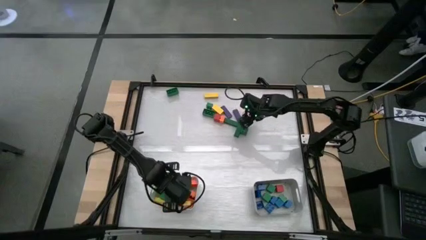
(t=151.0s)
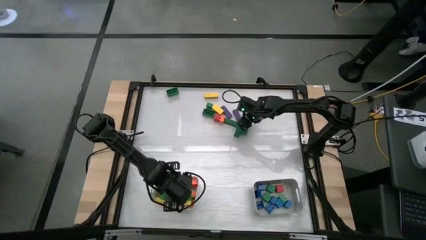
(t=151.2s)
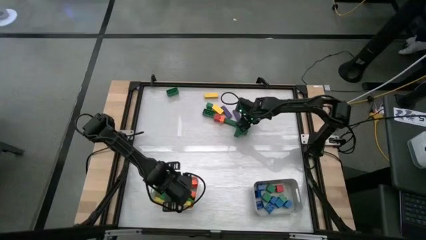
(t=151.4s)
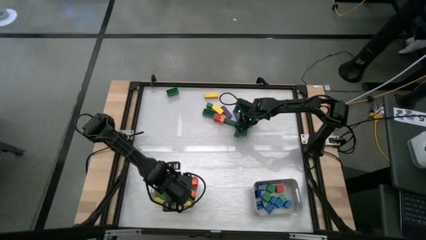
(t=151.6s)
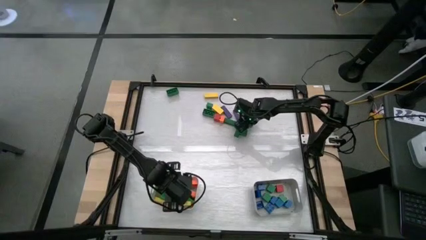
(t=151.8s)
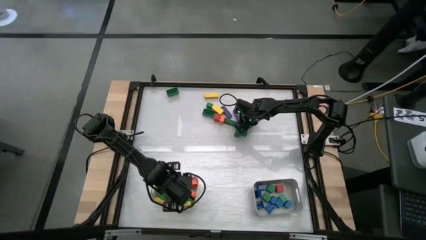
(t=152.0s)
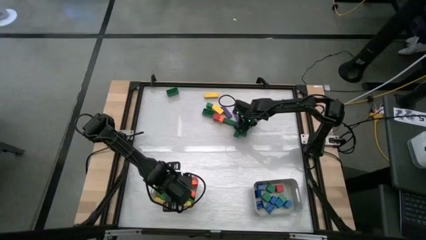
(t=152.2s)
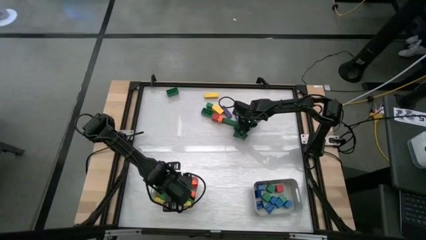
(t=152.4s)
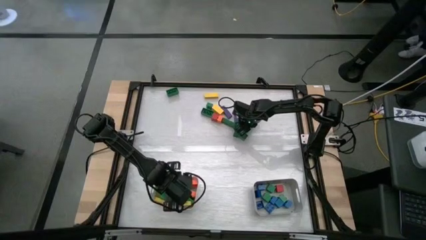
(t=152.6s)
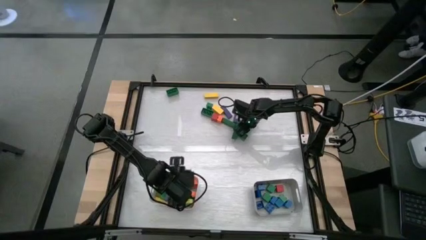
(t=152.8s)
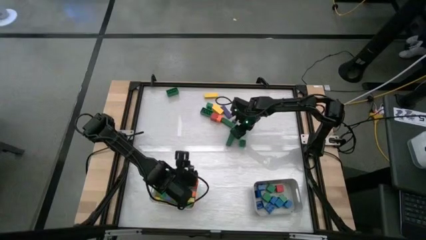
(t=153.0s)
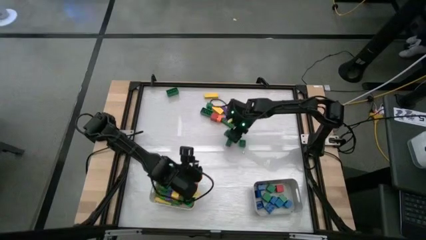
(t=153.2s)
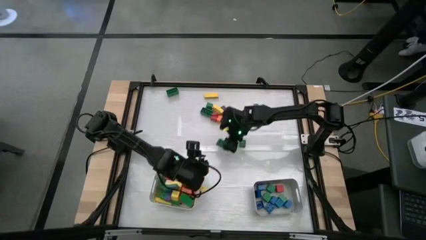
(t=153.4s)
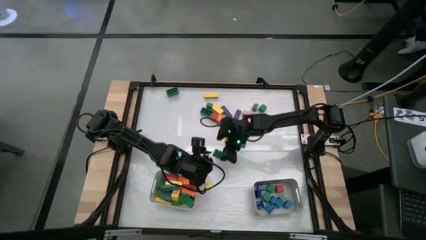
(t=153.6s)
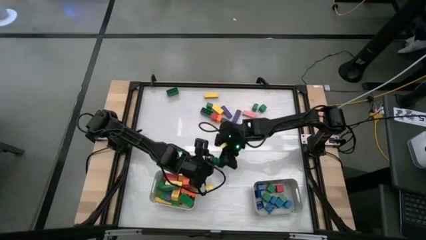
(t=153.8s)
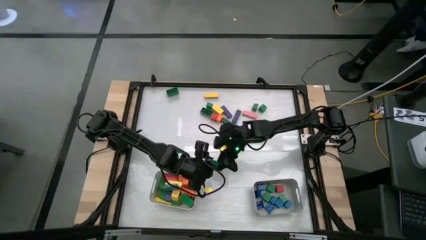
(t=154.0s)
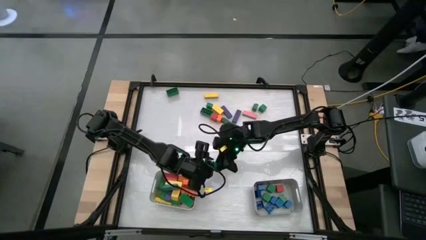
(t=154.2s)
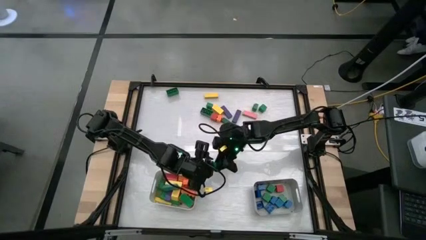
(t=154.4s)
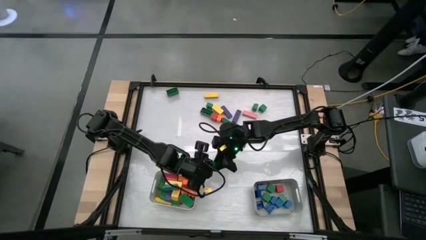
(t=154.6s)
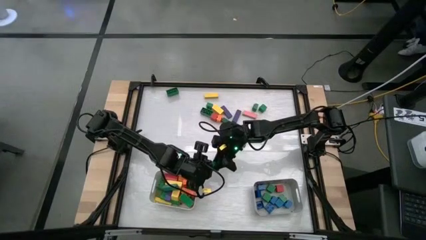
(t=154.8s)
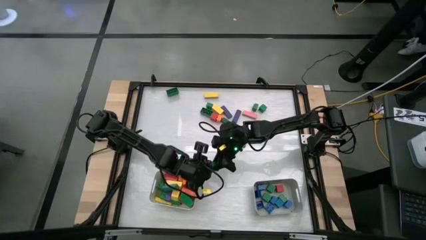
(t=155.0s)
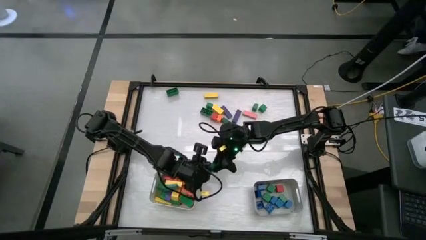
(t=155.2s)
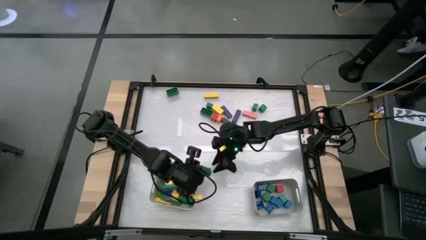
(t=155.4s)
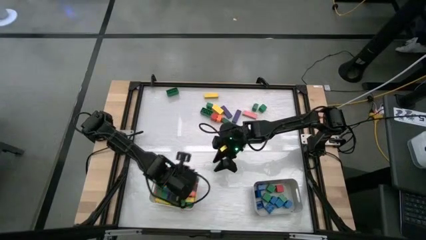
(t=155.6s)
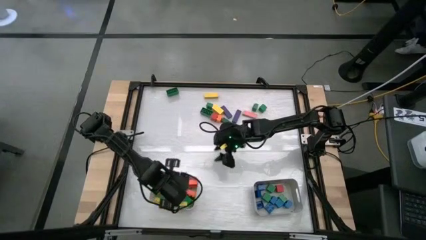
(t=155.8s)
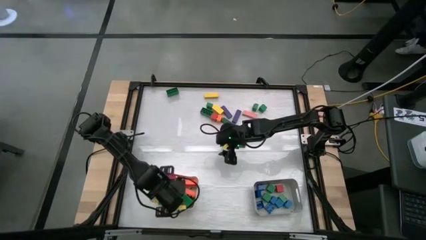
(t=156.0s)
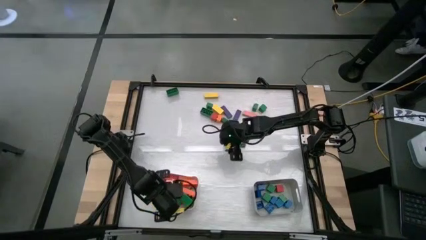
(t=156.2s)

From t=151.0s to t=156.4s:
Task: Sort blocks by size
Put the rectangular green game piece into the white bin

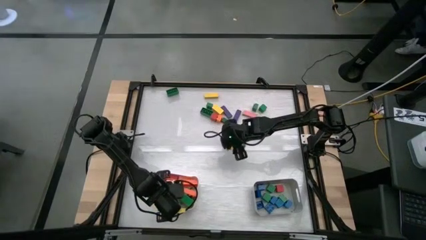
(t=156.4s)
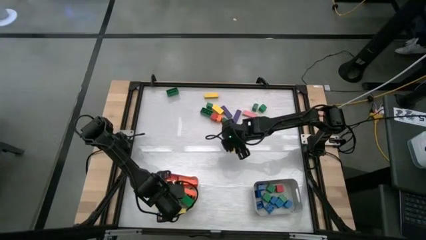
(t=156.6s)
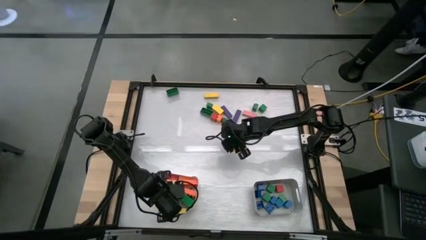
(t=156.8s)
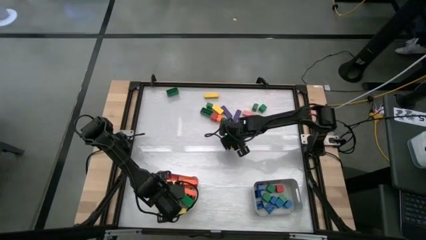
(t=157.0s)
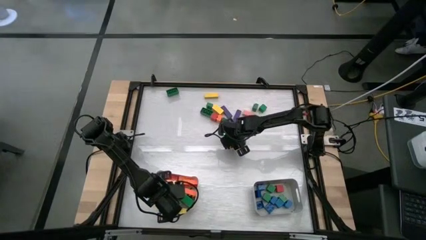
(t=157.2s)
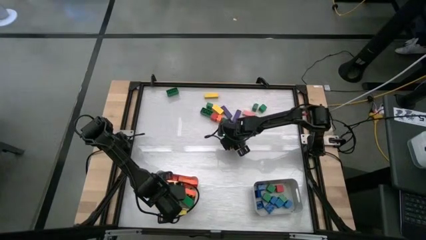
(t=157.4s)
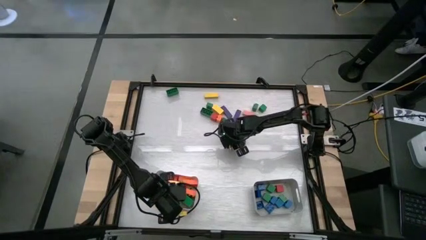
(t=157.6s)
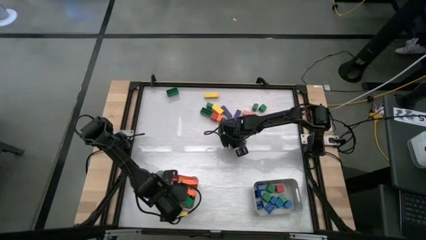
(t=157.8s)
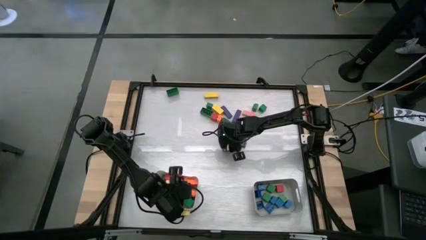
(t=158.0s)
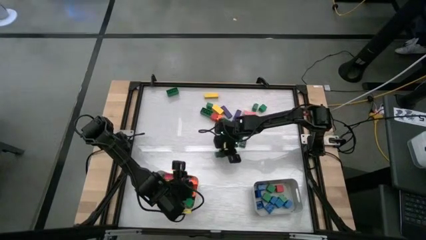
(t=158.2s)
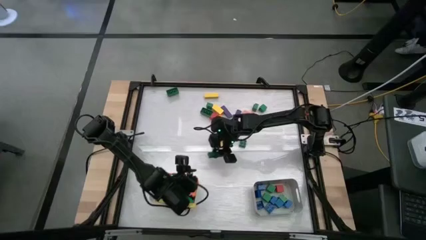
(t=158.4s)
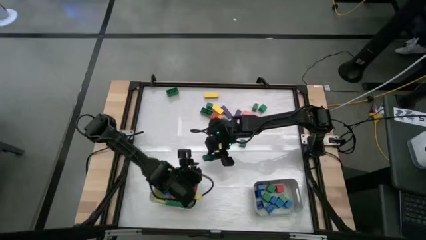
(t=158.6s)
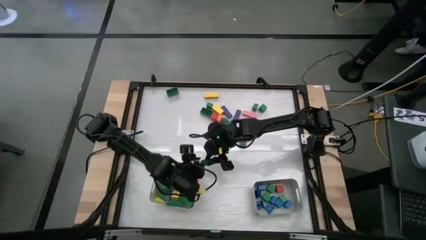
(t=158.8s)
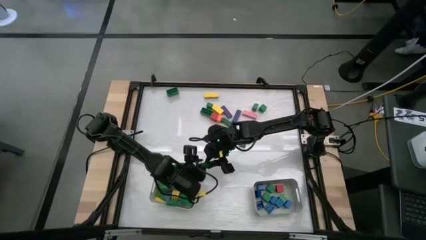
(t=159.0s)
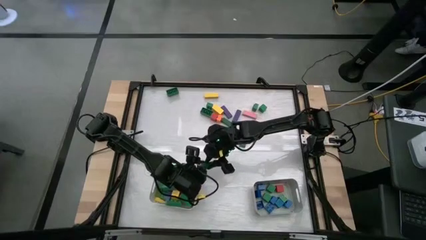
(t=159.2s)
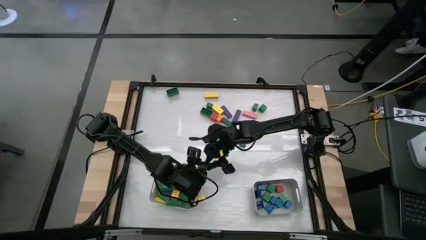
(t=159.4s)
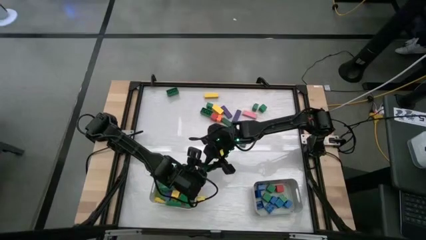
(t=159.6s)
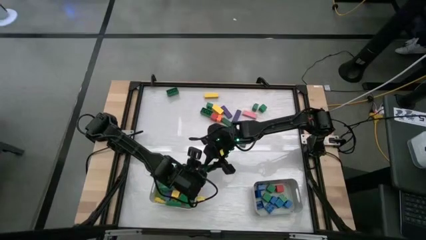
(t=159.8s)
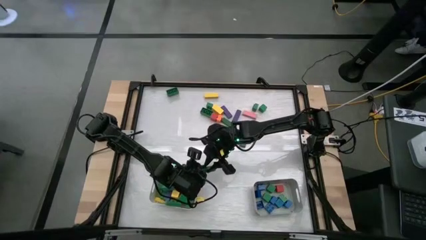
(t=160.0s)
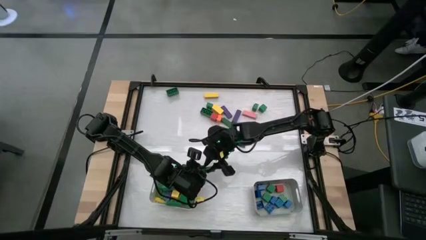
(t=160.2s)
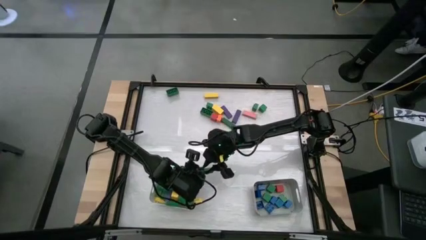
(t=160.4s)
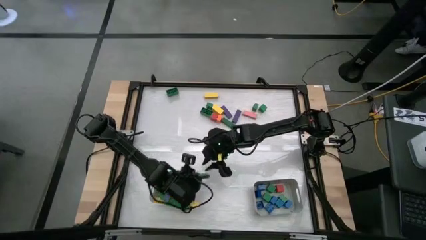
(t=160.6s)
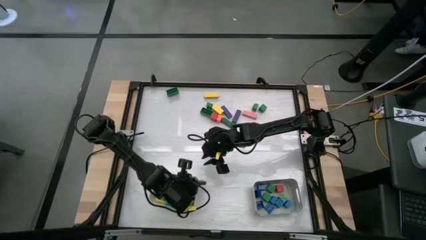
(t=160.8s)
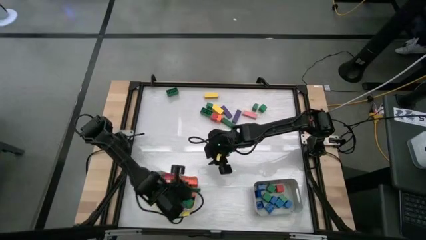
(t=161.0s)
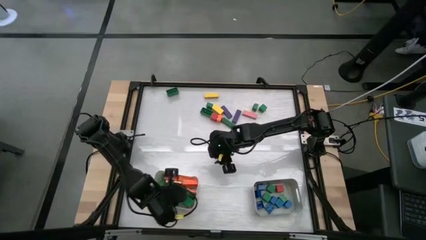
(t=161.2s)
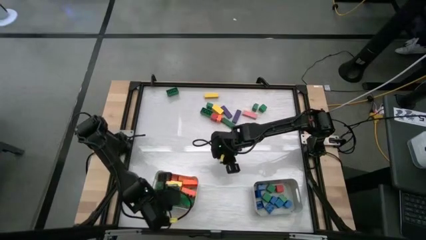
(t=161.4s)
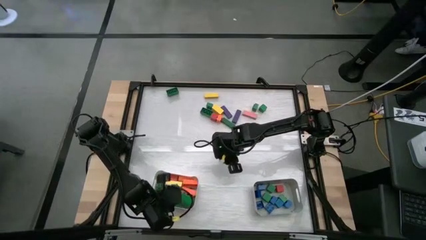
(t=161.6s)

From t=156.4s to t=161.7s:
Put the rectangular green block into the white bin

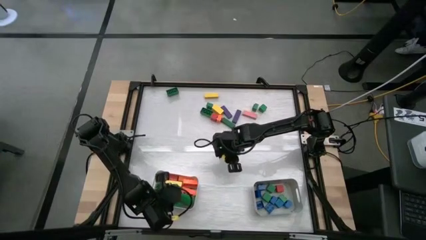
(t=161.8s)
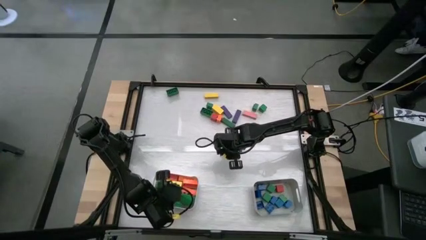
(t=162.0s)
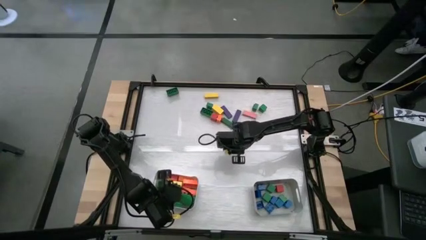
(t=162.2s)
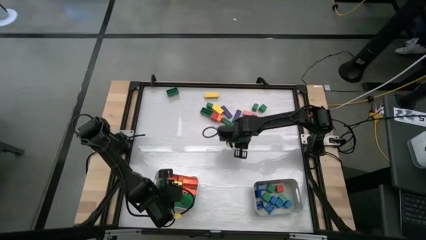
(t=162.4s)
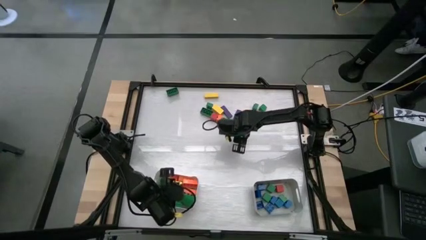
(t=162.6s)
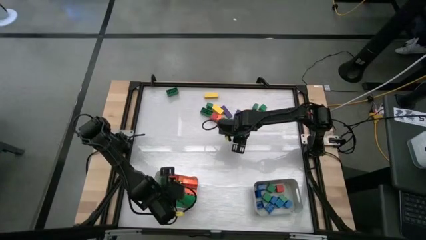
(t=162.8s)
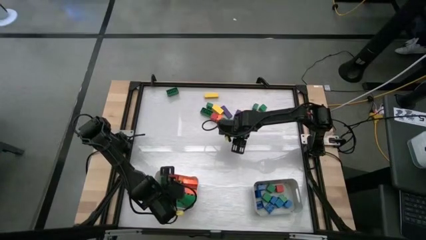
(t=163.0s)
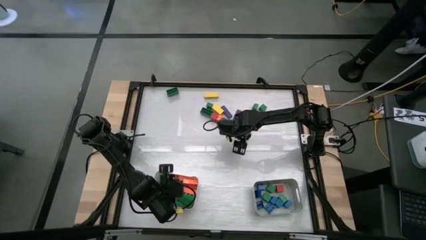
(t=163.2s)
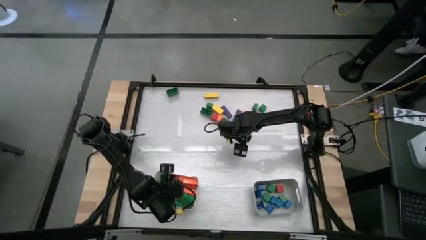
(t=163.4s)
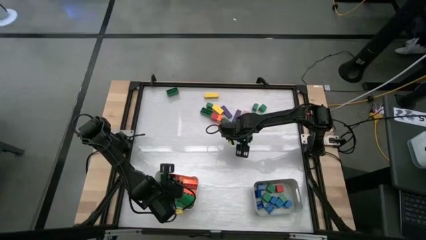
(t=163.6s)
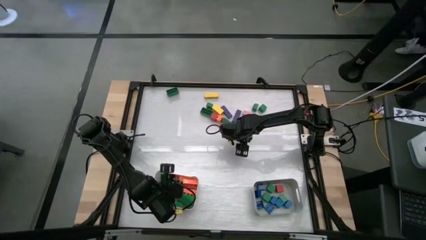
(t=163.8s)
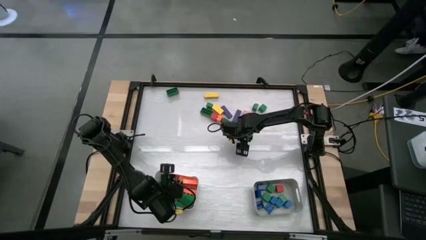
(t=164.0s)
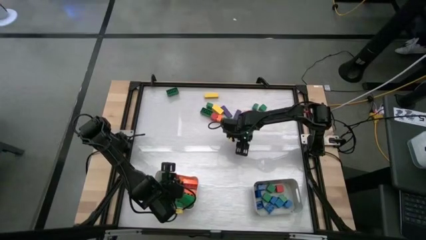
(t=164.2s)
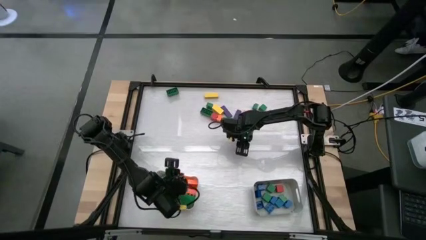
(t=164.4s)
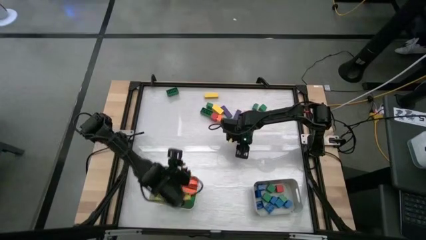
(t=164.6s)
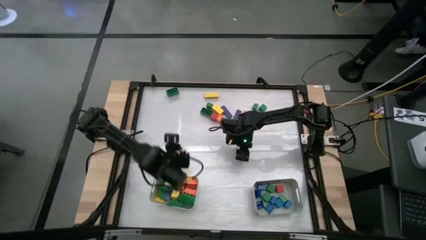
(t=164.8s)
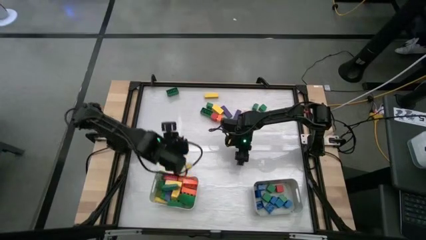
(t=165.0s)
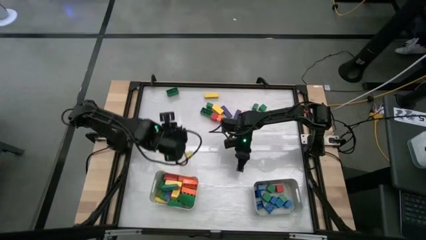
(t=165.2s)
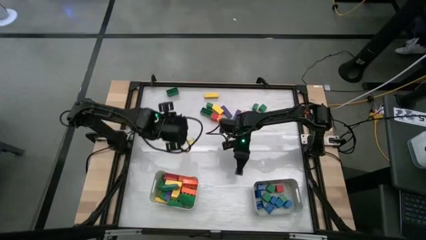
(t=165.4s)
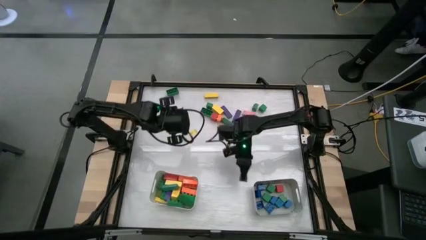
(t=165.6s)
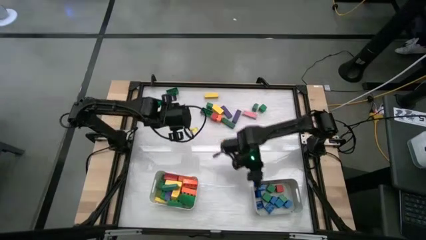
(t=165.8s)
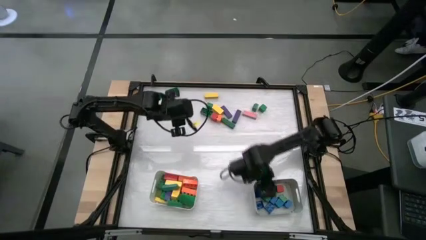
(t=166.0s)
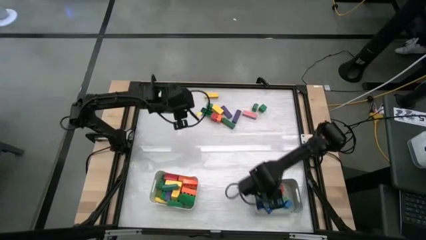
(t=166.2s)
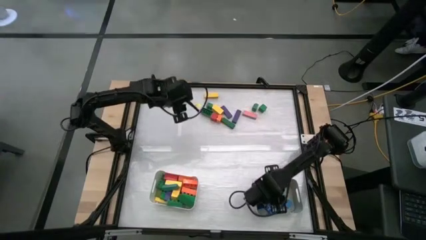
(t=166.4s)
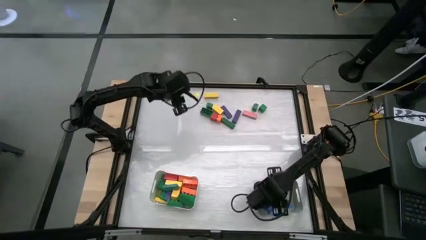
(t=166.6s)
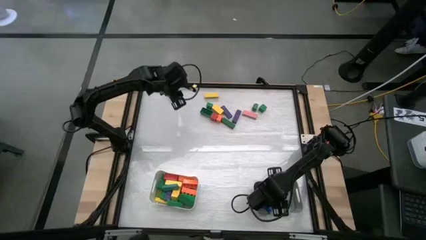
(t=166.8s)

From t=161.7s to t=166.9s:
Put the square green game piece into the gray bin
